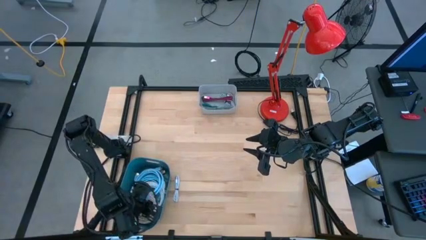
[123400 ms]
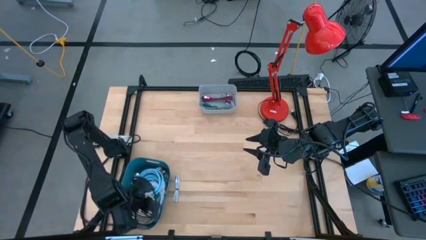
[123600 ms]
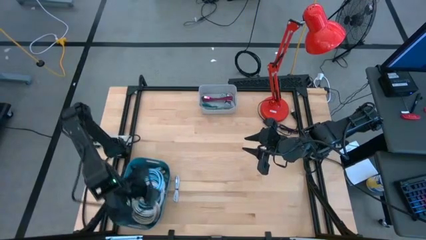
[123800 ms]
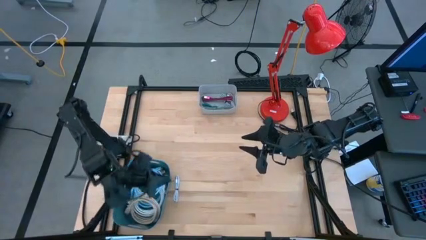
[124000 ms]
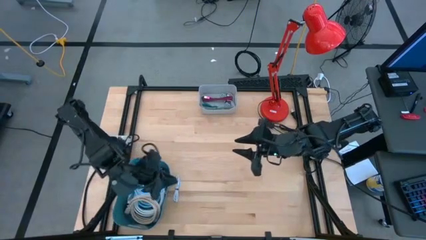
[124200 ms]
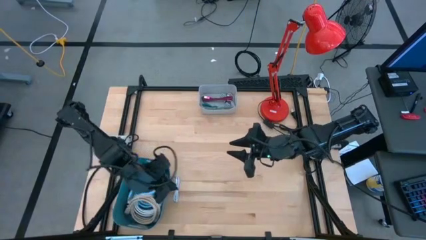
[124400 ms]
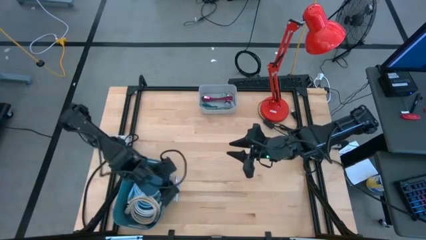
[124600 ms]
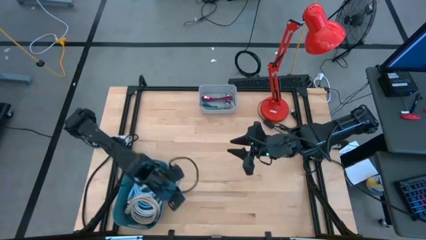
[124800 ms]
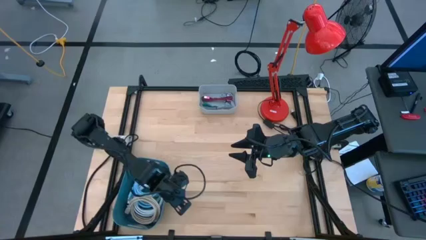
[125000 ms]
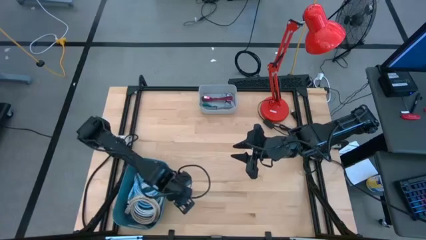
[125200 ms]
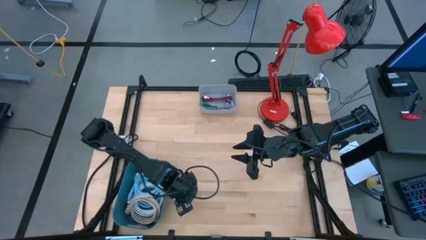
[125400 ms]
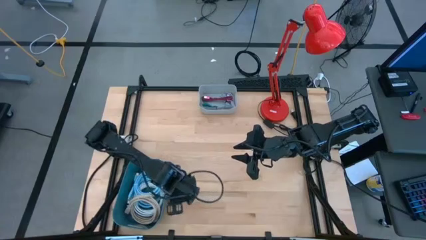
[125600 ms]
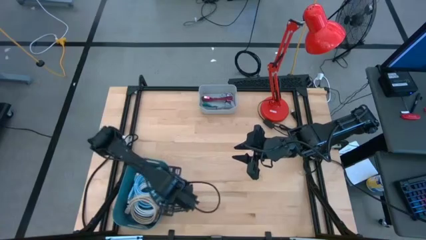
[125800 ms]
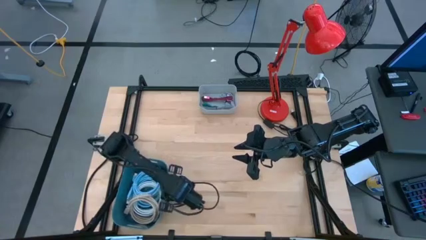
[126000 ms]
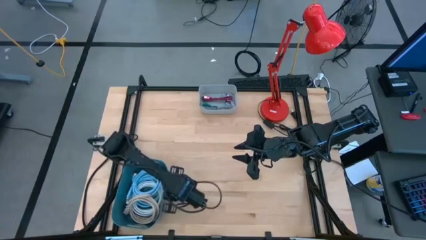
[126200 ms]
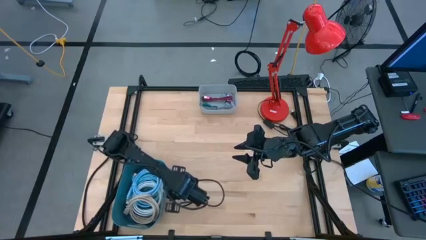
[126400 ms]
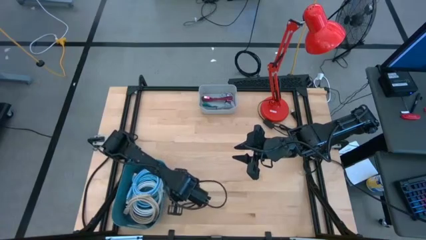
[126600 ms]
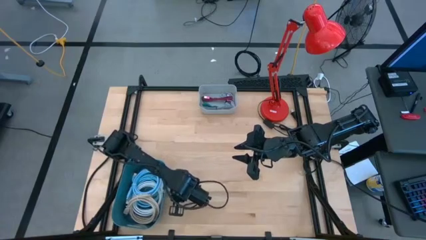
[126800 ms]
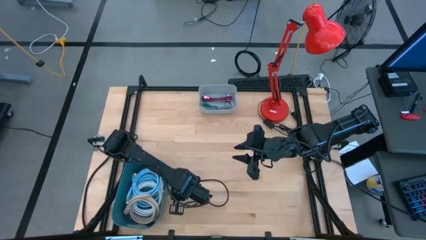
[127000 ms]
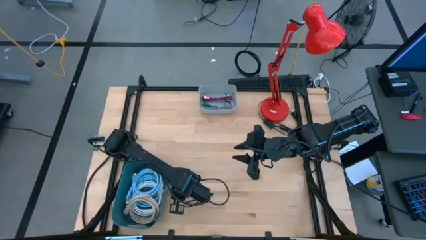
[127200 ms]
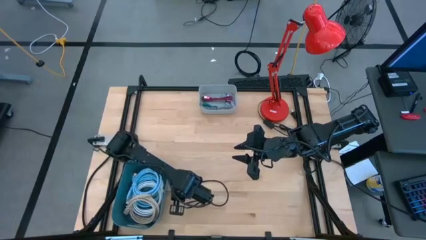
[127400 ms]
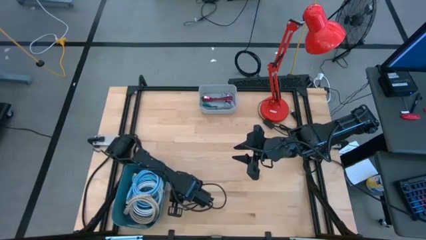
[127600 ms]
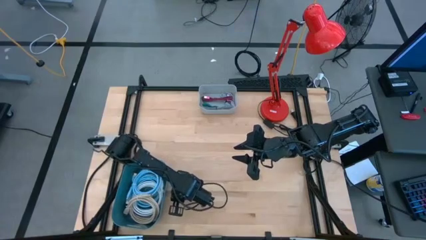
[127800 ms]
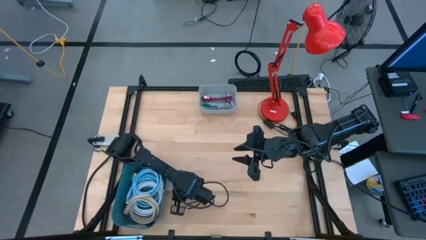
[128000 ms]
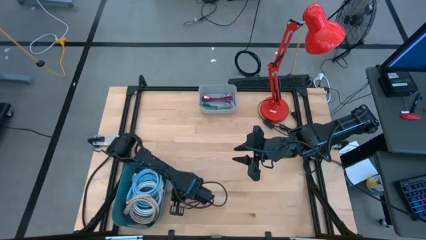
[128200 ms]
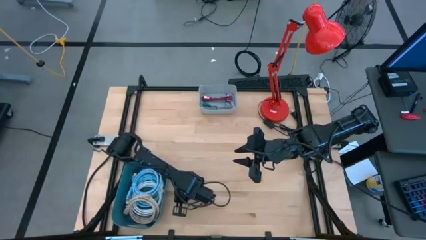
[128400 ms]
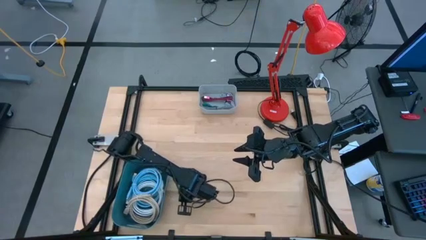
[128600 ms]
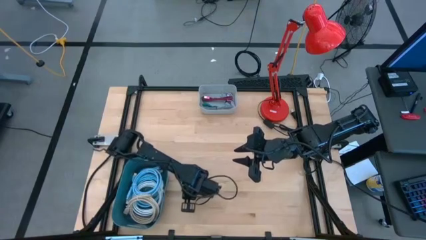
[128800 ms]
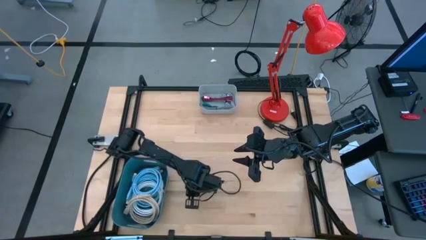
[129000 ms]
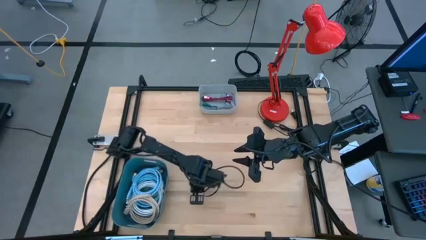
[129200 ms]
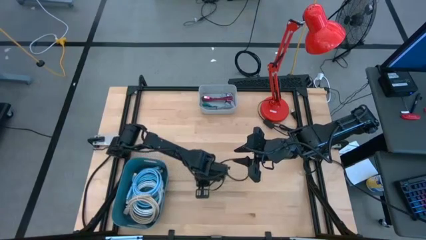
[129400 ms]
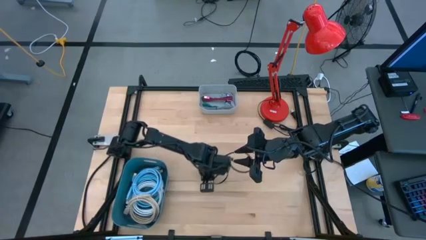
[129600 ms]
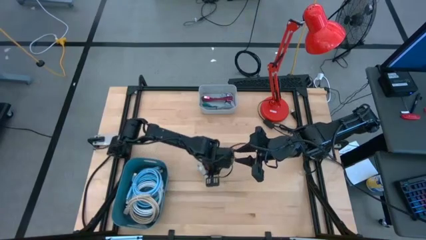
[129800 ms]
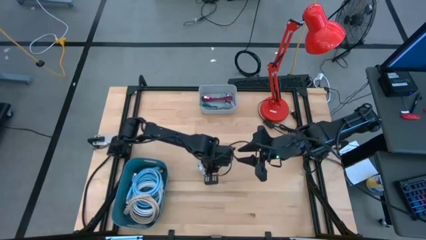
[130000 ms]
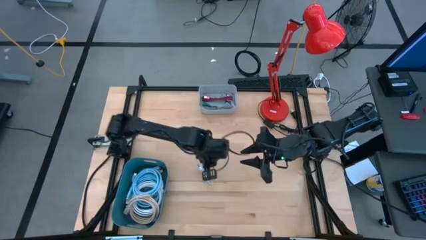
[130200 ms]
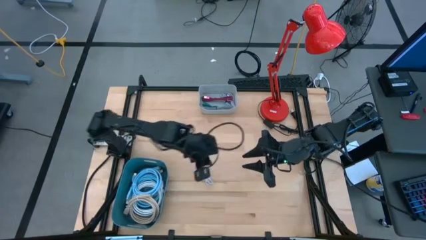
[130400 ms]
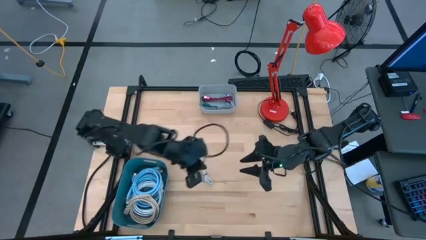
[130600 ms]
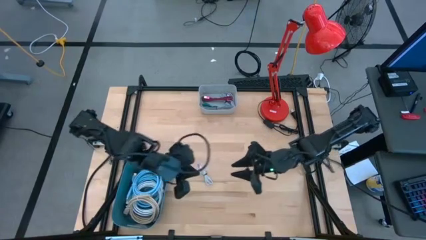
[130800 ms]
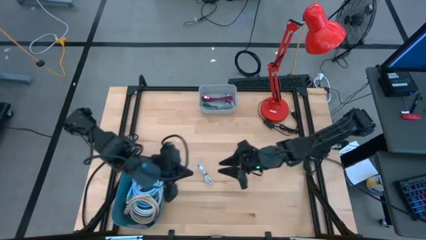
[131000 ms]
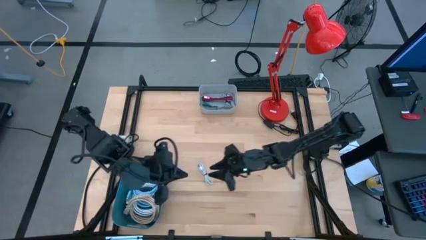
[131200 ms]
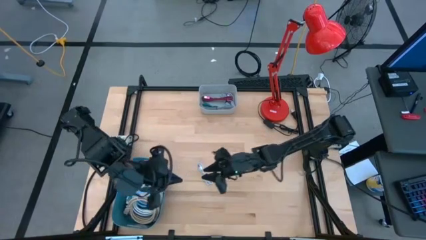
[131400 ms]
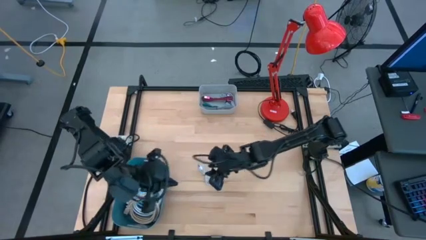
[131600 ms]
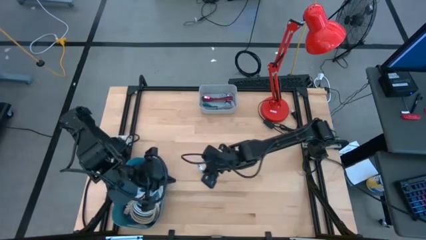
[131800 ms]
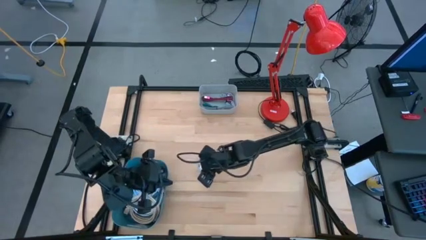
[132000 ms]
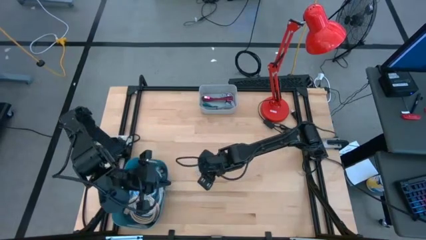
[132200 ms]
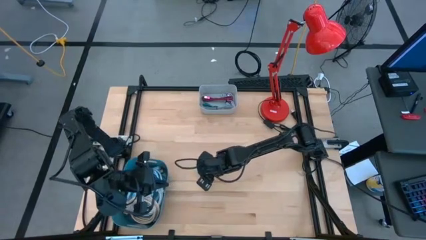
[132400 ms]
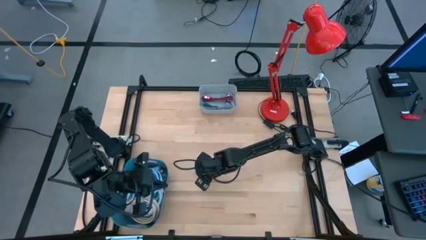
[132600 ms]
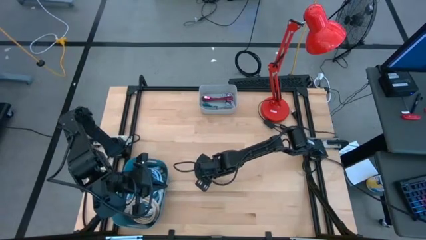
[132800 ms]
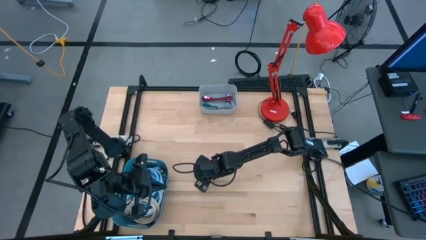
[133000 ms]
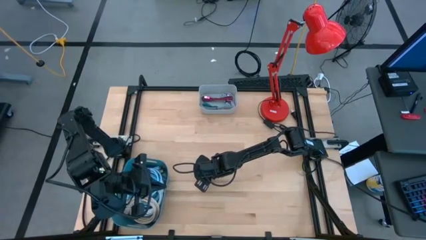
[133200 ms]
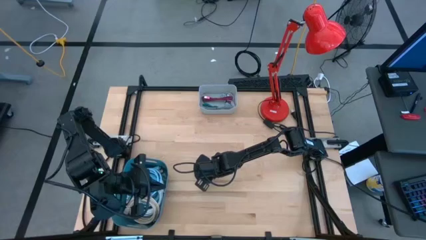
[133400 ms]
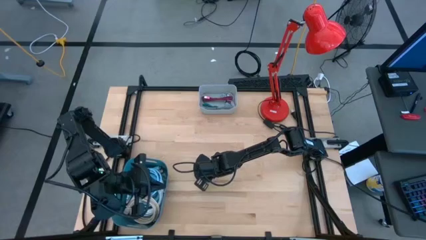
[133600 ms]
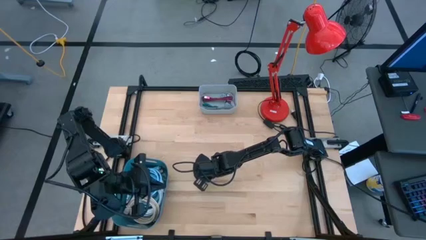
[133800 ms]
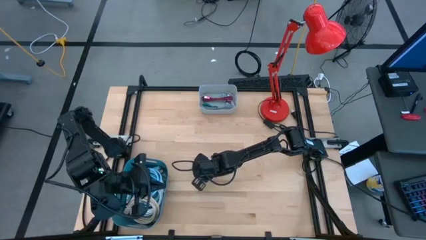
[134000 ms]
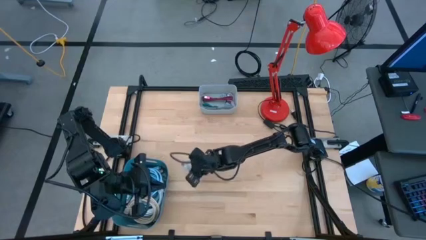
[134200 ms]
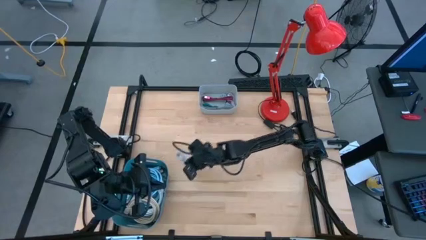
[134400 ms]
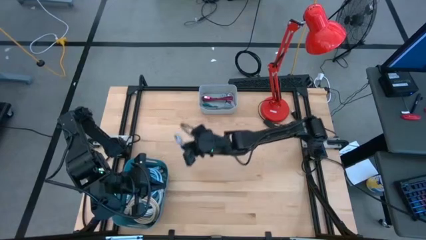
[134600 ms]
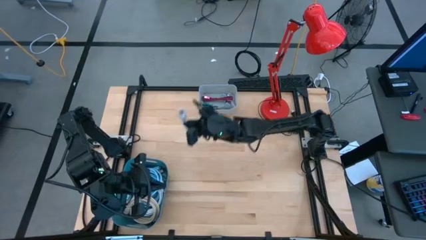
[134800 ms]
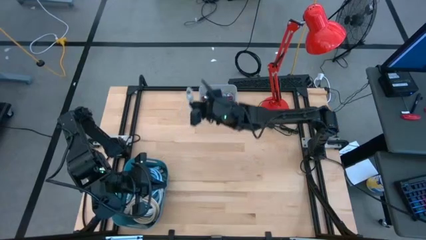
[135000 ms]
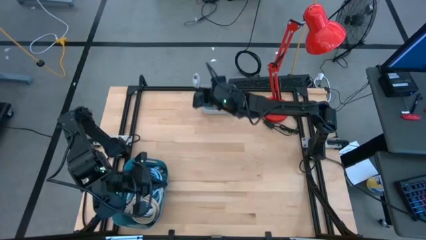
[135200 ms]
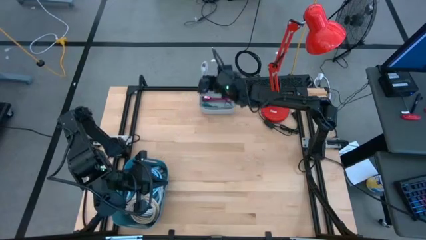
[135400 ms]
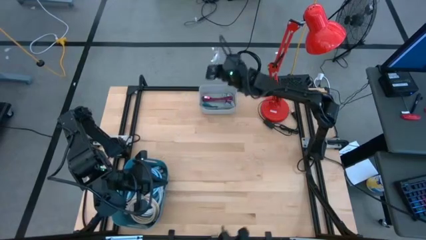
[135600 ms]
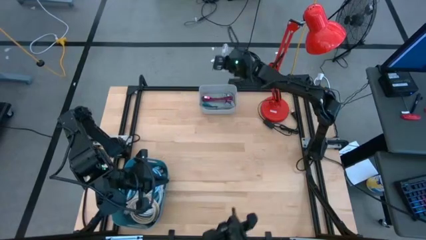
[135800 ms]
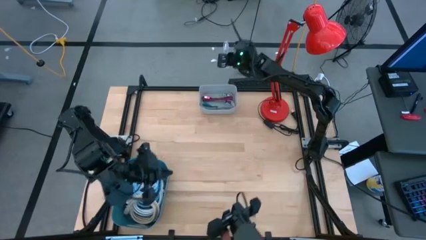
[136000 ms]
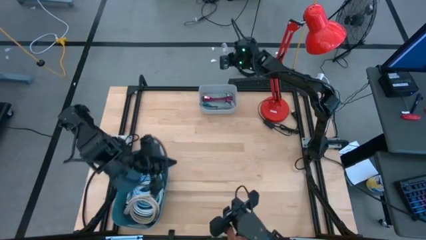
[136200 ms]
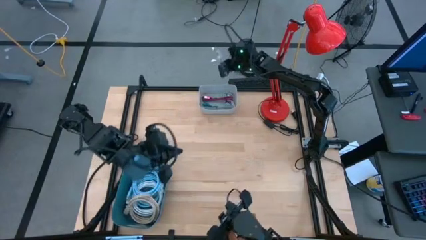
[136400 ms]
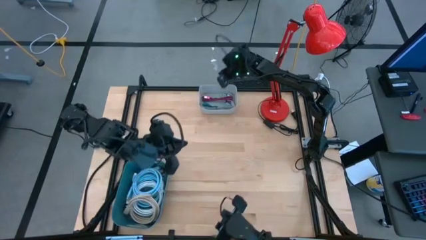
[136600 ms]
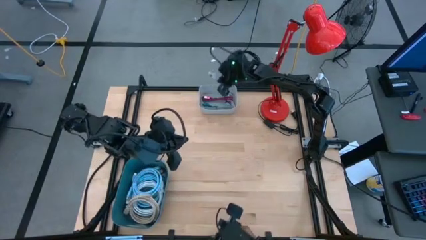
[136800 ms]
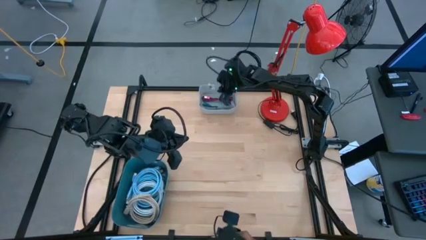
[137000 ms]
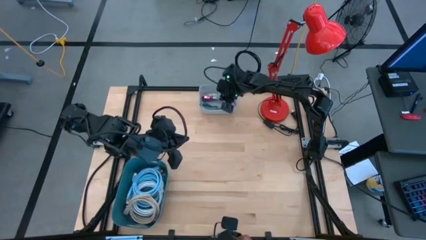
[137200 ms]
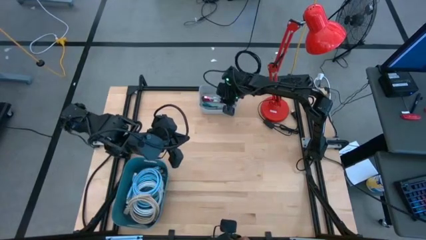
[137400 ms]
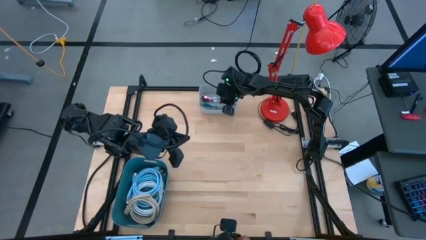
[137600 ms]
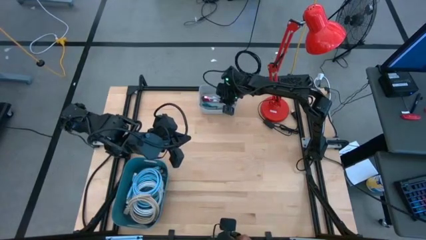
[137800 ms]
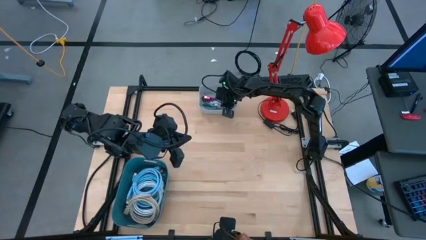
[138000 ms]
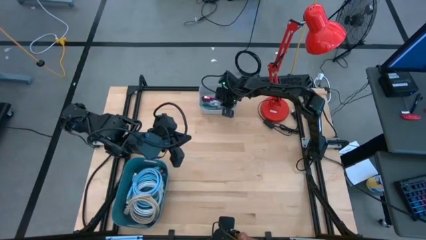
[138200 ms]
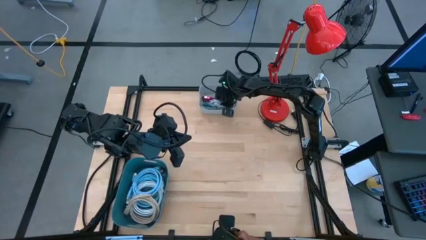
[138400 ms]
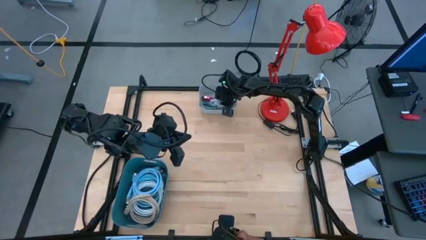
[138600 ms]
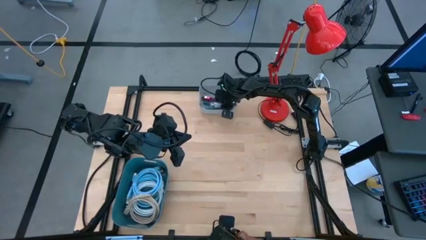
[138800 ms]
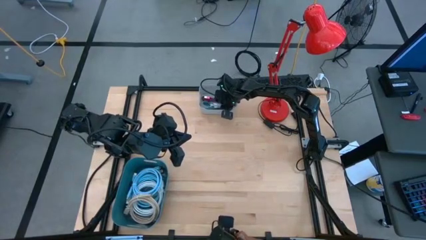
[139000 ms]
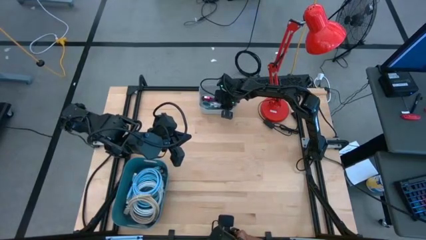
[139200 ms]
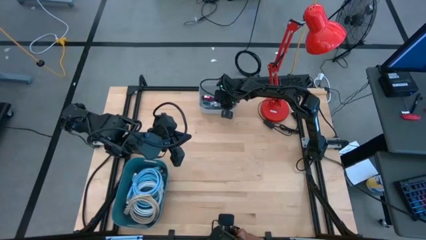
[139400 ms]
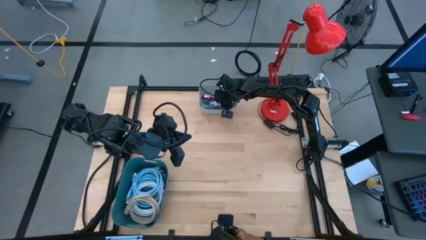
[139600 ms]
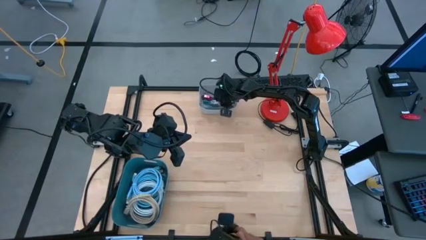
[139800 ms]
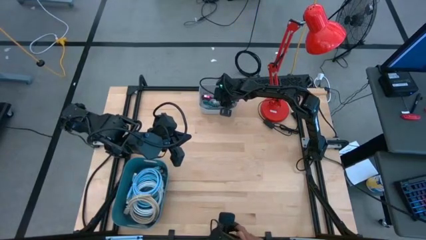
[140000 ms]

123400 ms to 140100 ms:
Task: Pick & Place USB Port
Put the white charger cable into the gray bin
